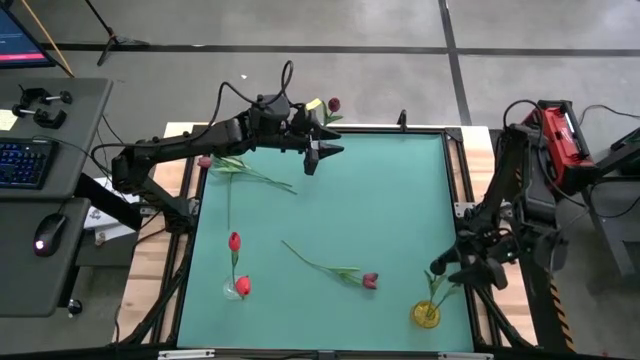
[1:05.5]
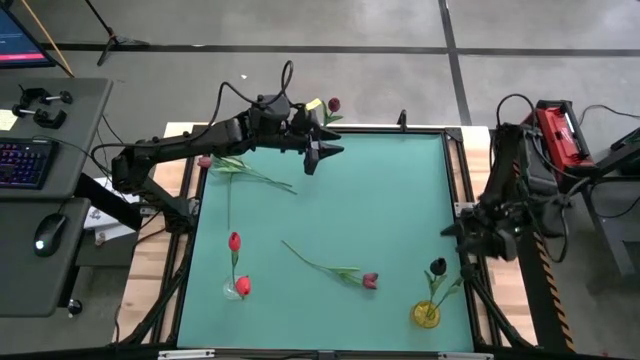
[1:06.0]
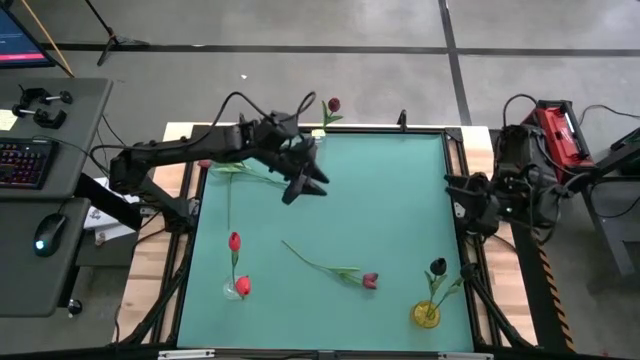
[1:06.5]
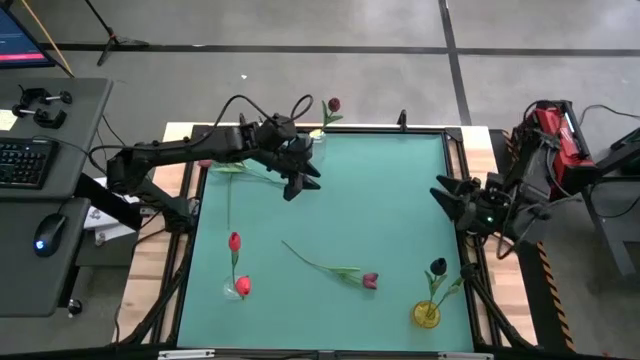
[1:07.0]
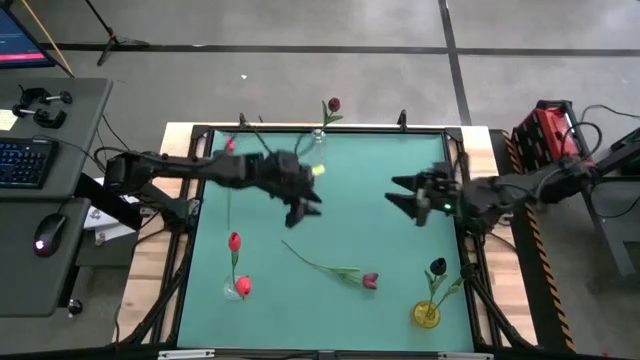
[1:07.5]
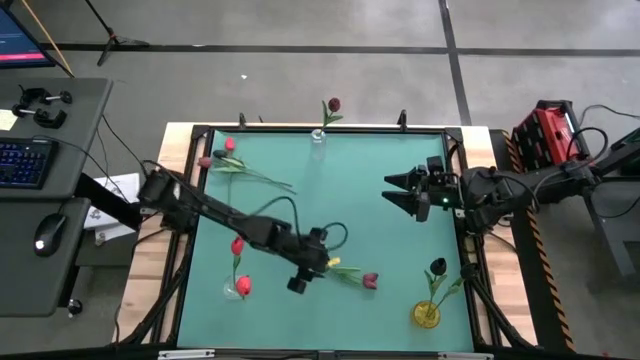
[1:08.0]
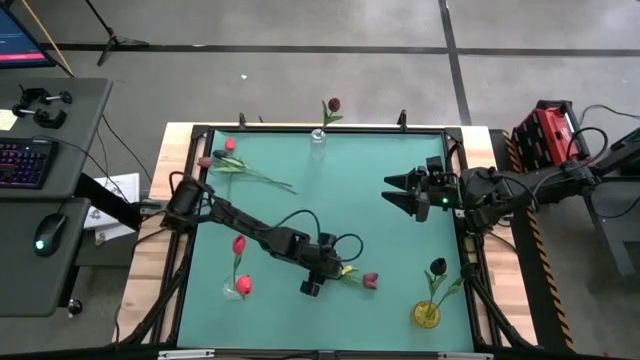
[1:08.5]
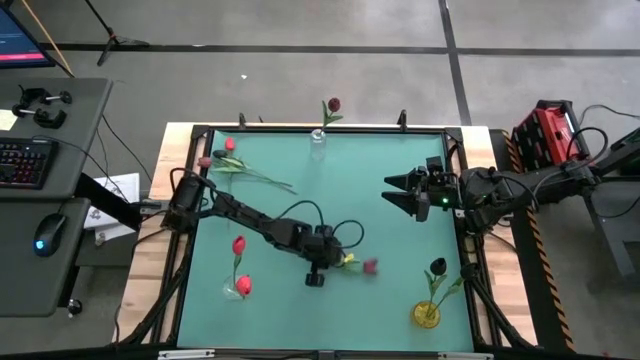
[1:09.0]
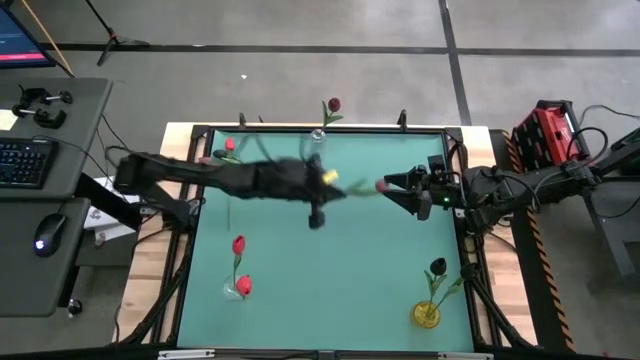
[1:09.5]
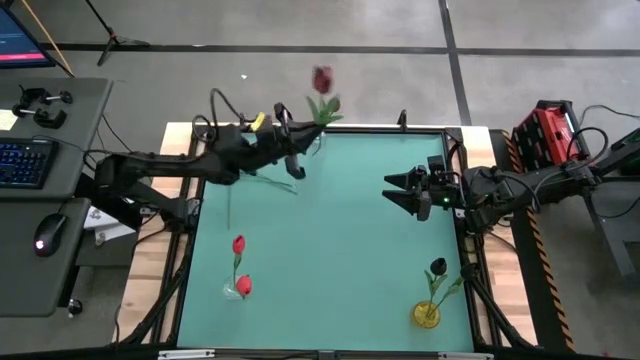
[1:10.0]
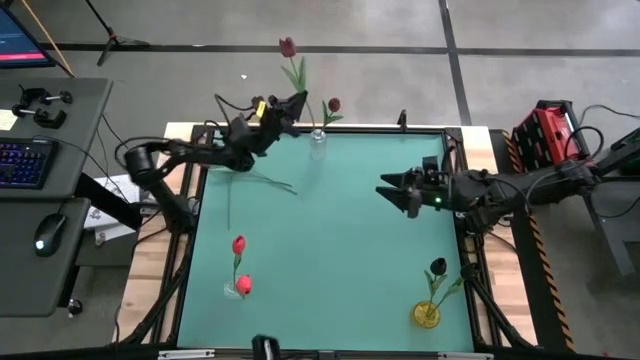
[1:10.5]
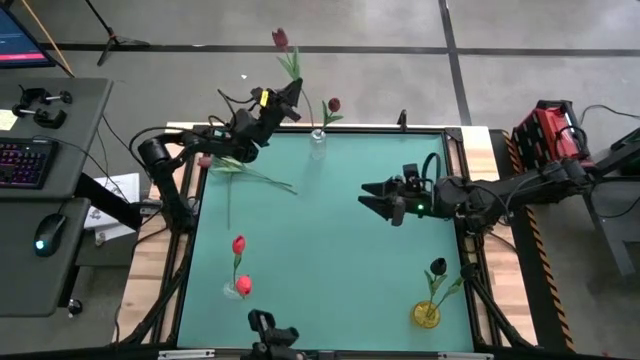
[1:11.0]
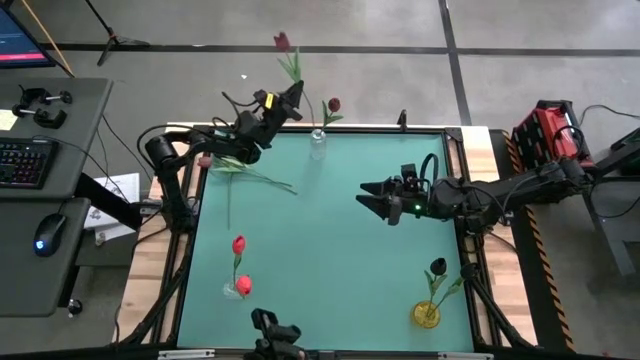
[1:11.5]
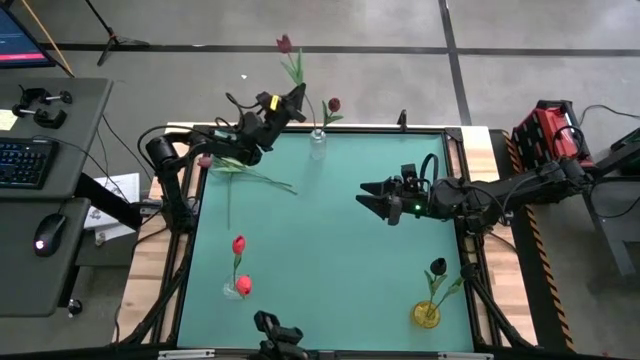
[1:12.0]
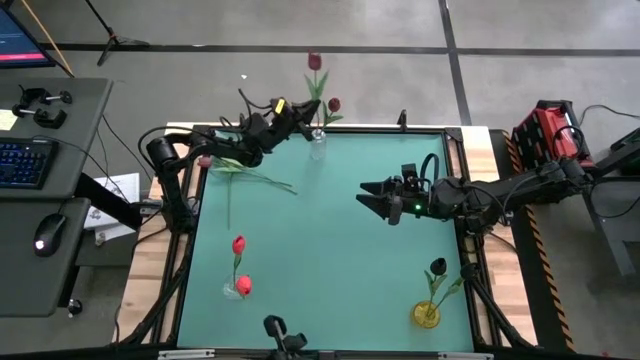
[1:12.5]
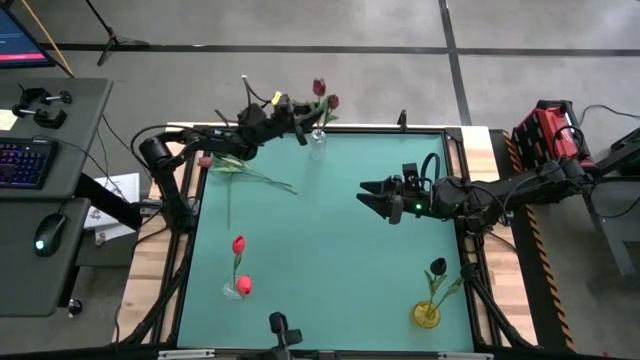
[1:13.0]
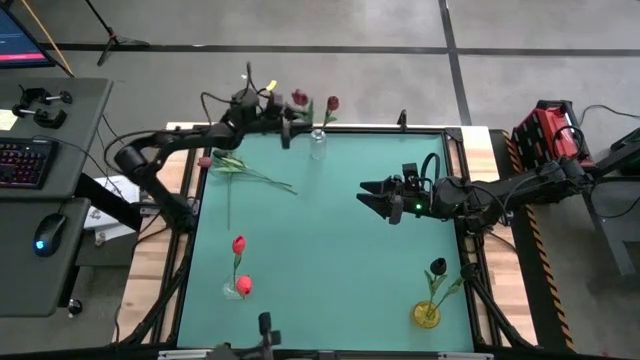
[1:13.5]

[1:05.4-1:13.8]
Task: Sort flowers into vase by color
Put the bottom red flower into the top transparent vase

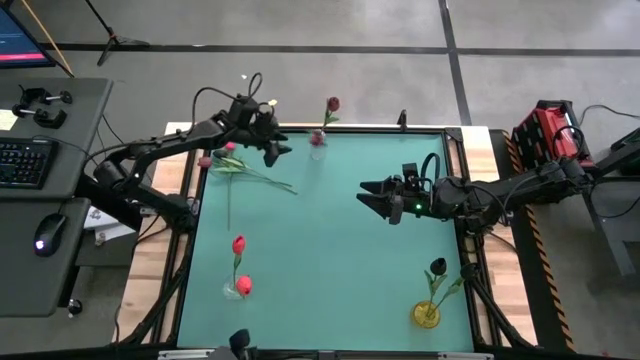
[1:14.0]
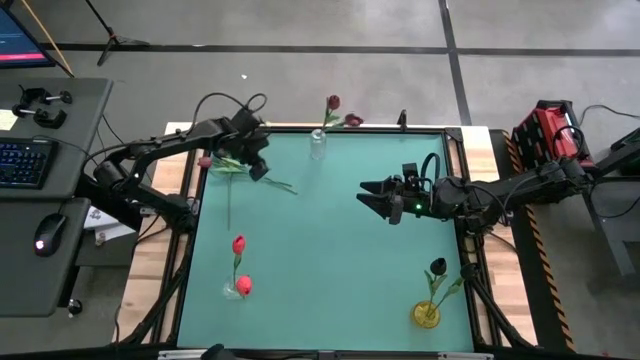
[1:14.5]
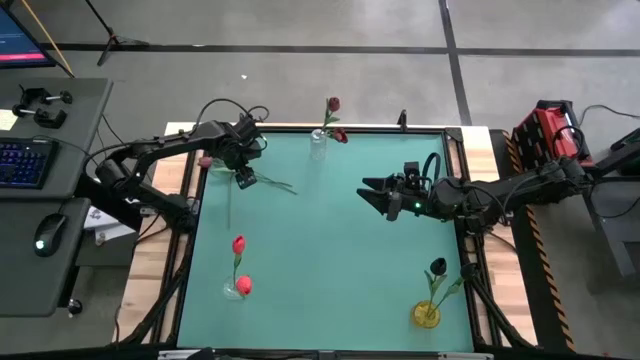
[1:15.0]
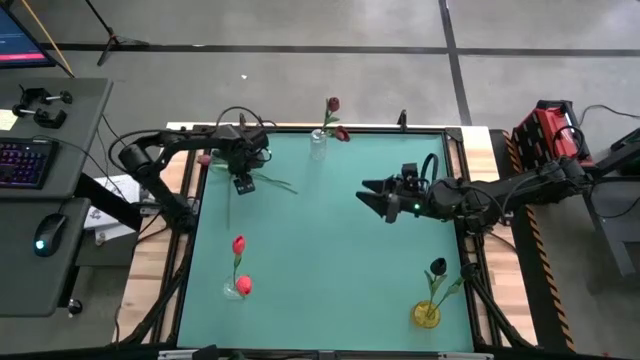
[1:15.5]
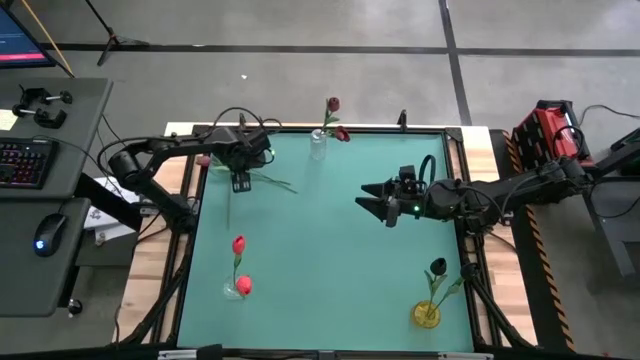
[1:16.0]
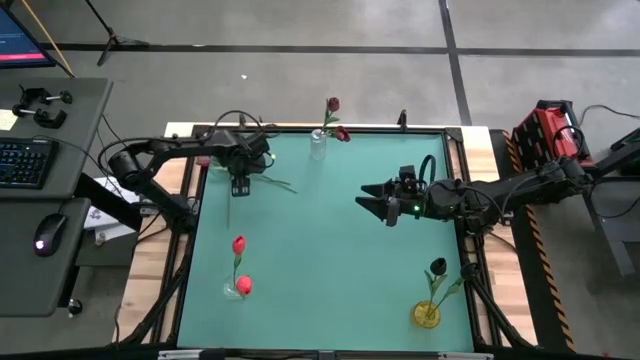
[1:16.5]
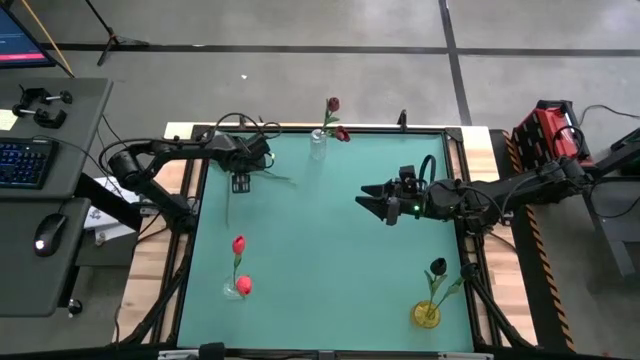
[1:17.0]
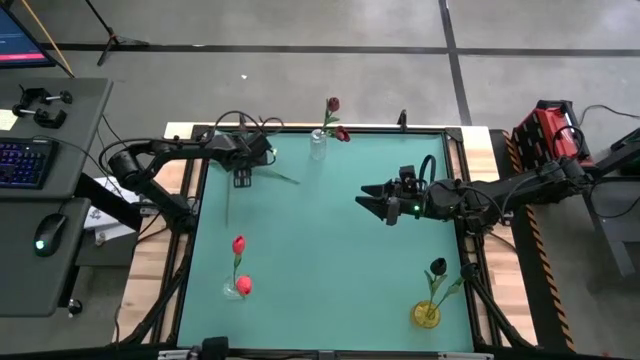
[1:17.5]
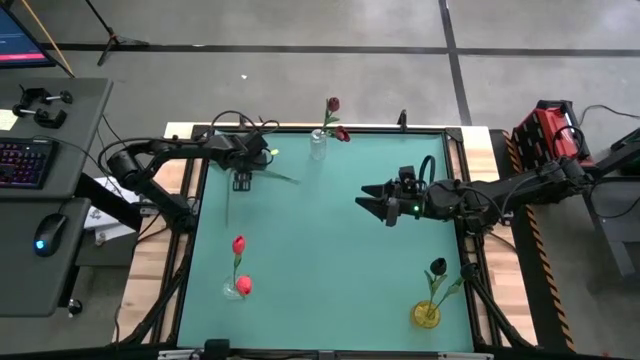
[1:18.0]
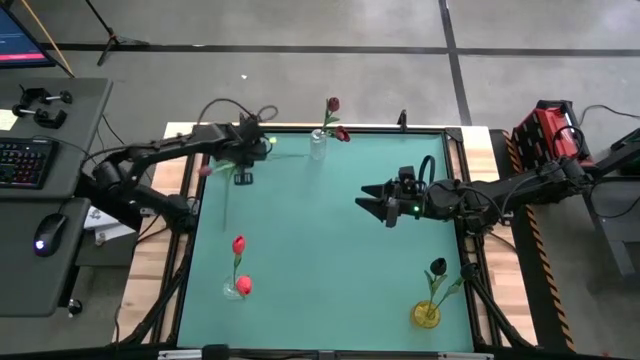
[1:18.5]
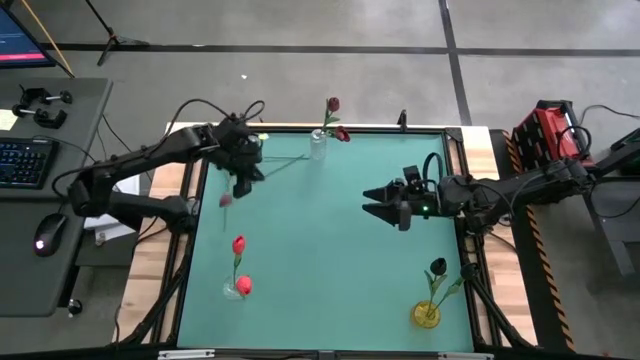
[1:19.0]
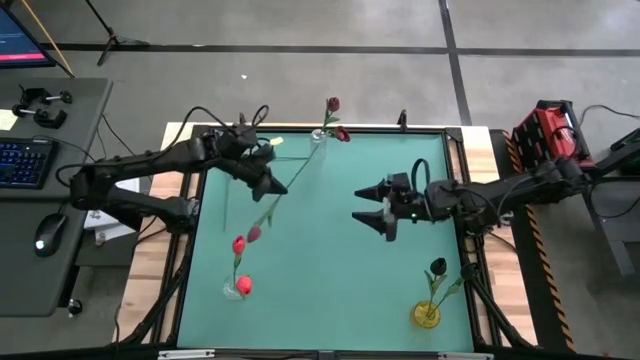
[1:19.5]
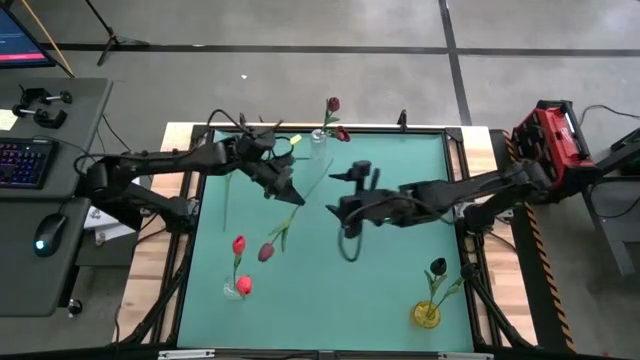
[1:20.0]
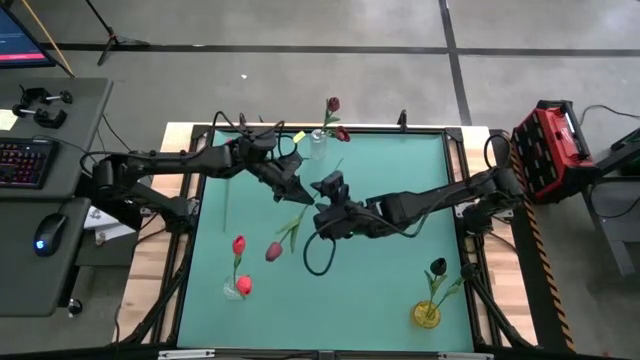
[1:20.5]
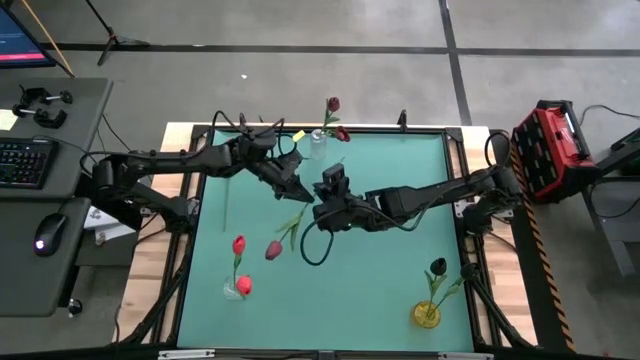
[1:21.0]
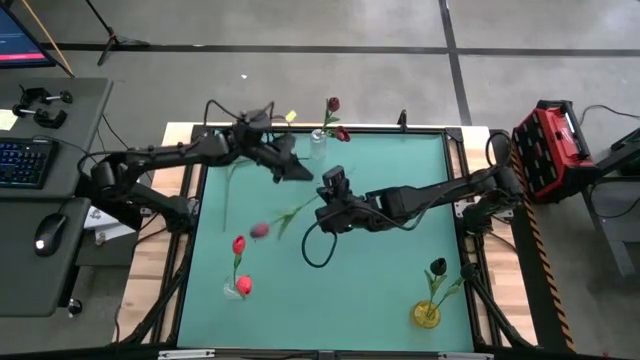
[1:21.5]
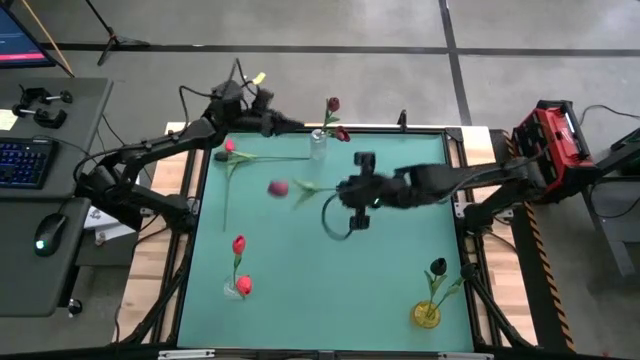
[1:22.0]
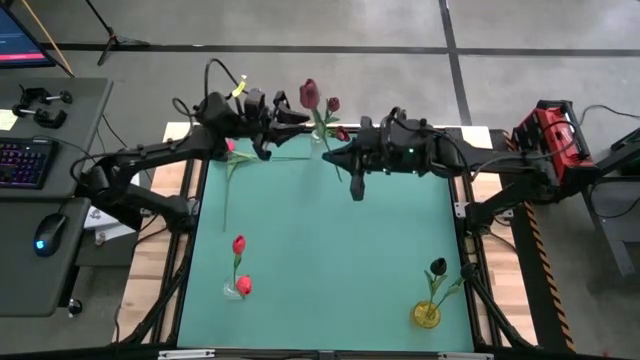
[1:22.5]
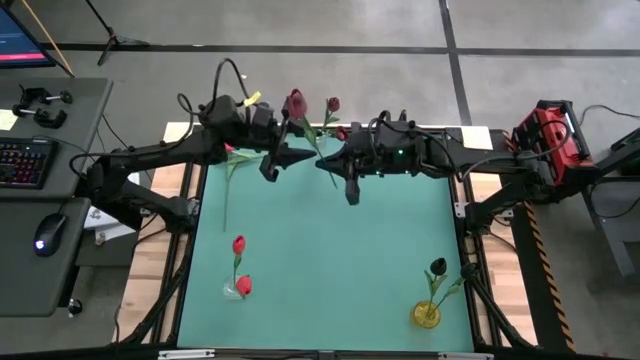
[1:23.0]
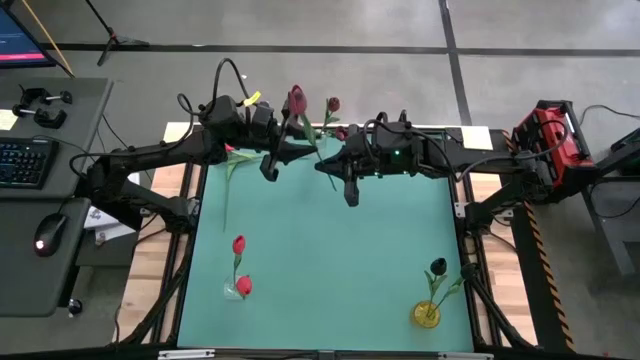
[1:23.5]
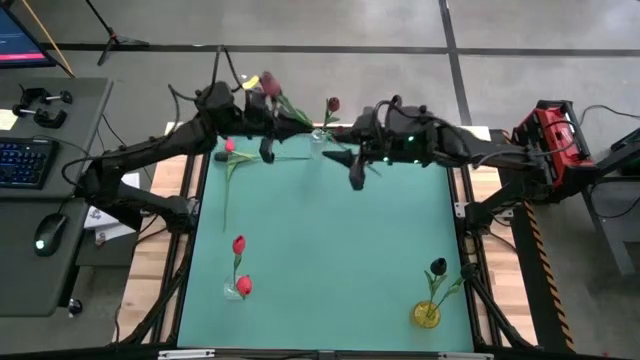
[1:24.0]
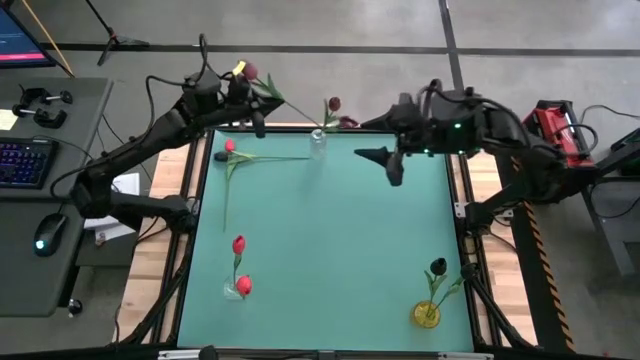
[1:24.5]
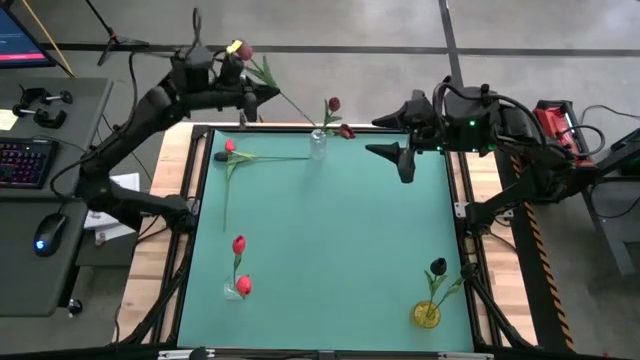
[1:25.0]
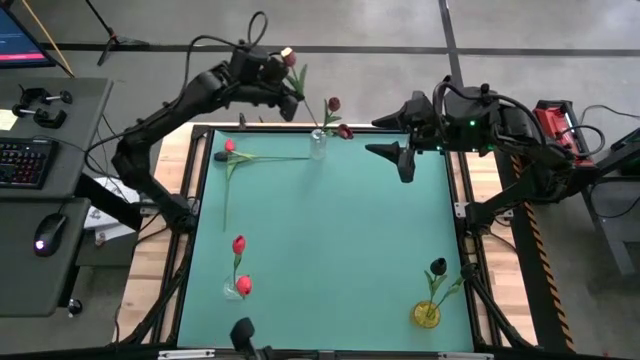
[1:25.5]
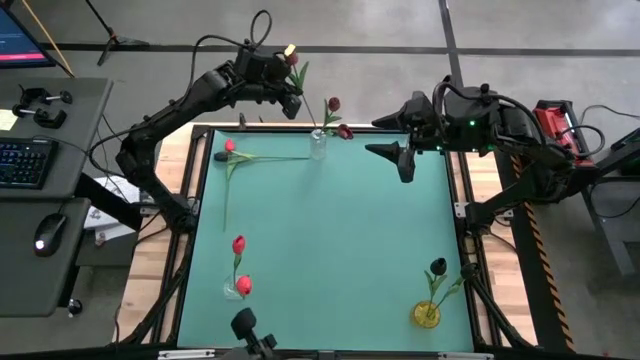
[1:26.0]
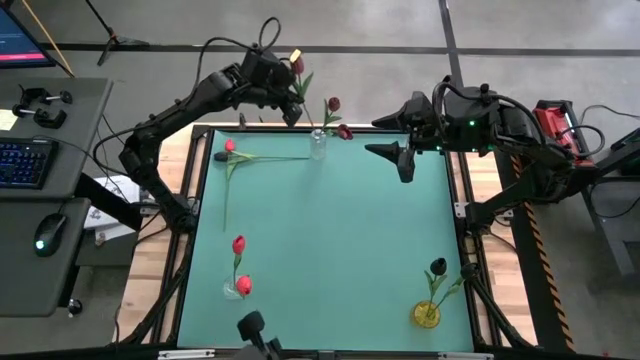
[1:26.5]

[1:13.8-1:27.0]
Put the red flower into the top transparent vase
